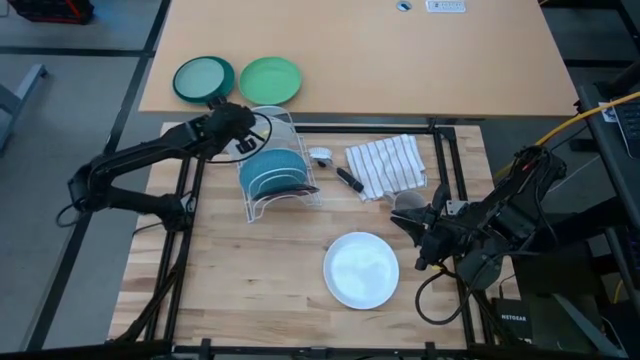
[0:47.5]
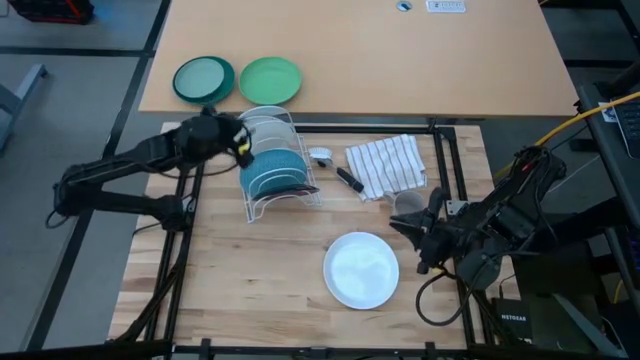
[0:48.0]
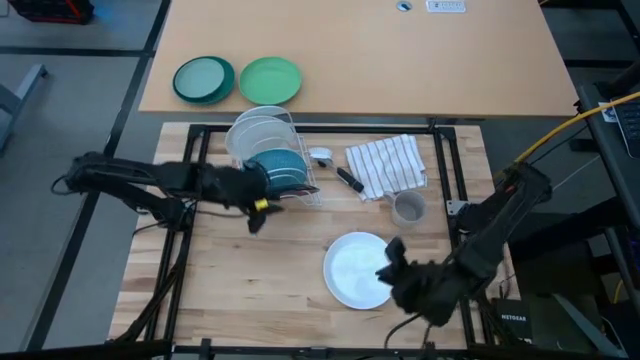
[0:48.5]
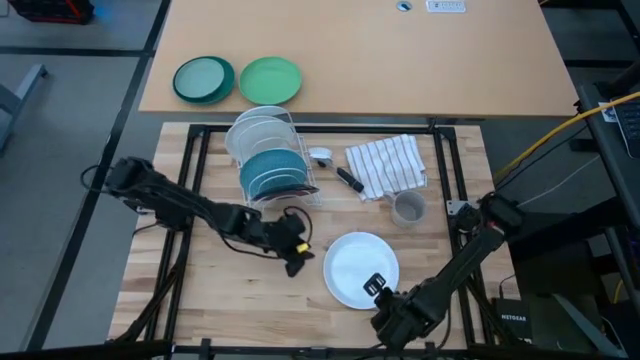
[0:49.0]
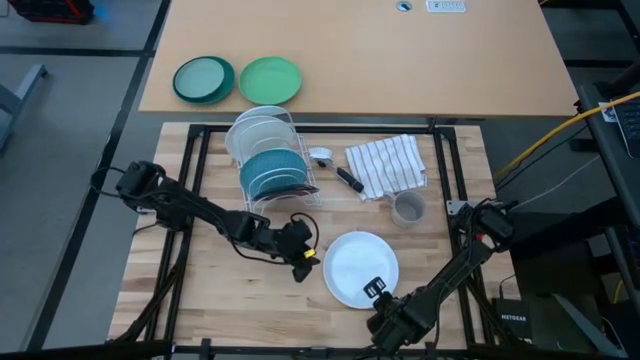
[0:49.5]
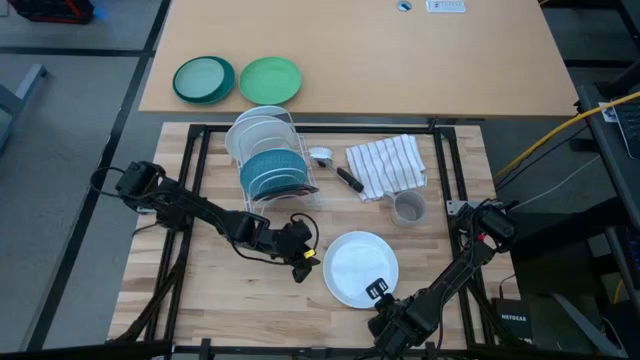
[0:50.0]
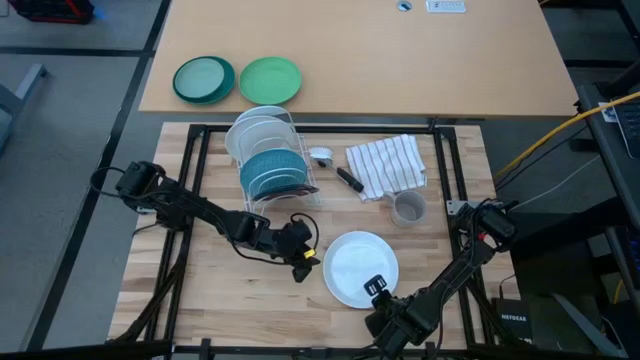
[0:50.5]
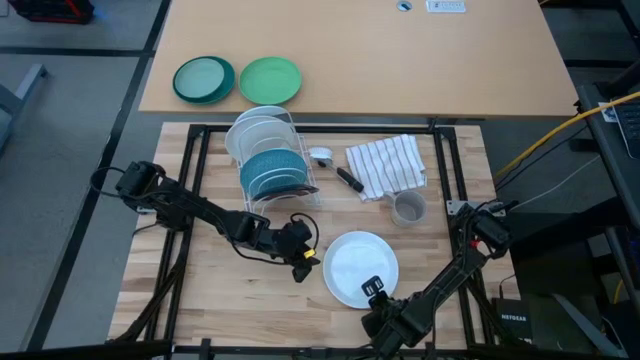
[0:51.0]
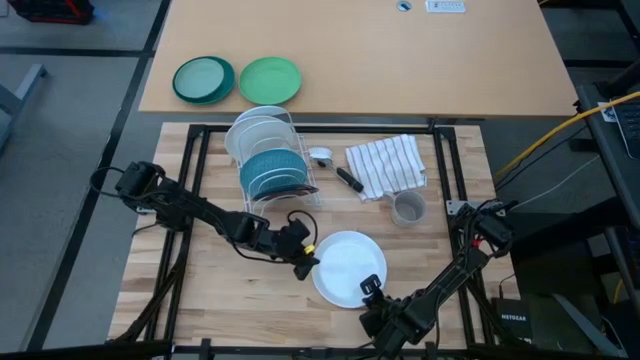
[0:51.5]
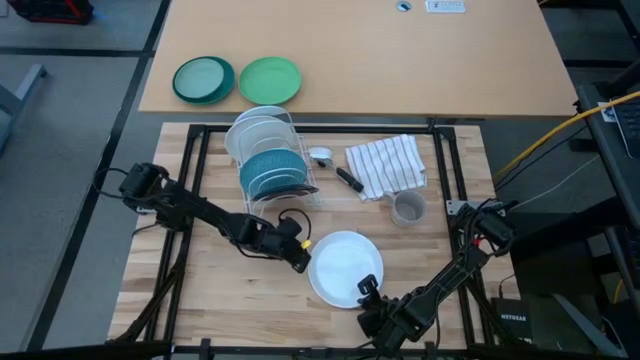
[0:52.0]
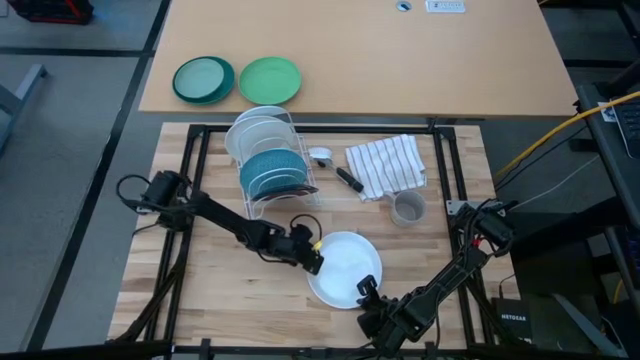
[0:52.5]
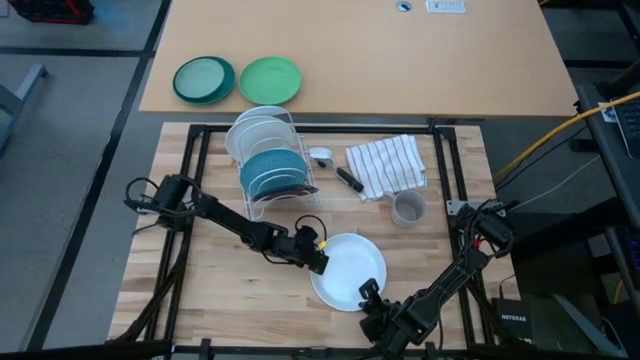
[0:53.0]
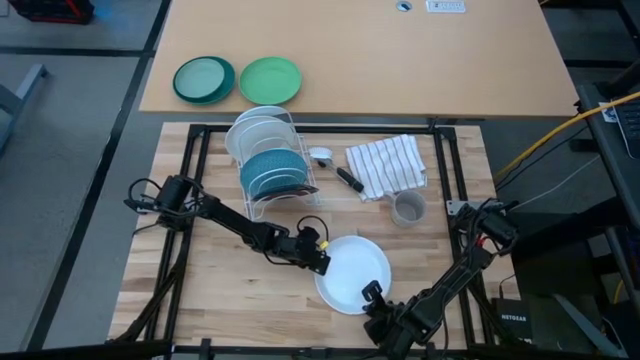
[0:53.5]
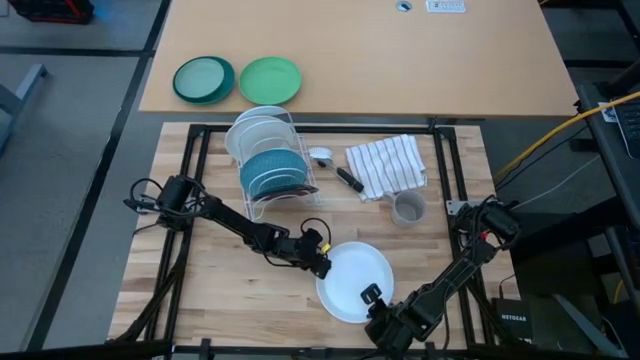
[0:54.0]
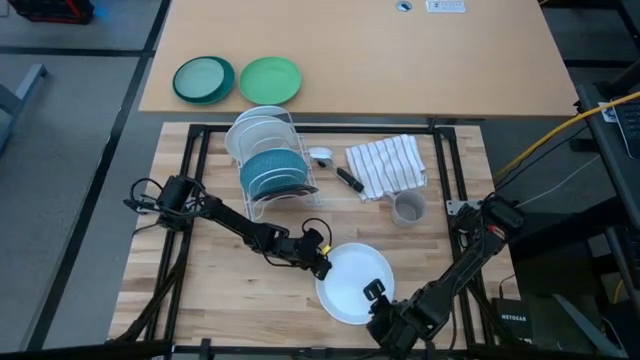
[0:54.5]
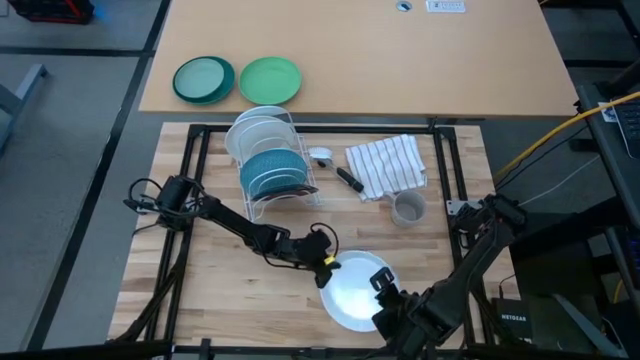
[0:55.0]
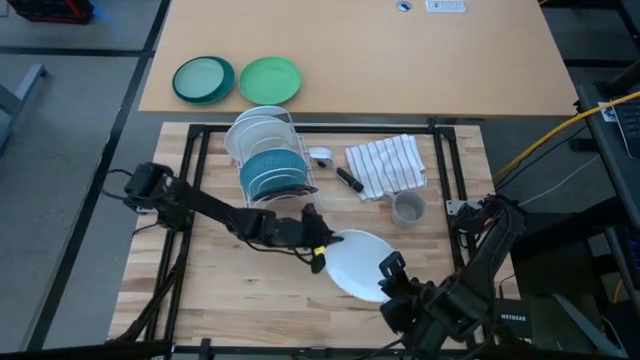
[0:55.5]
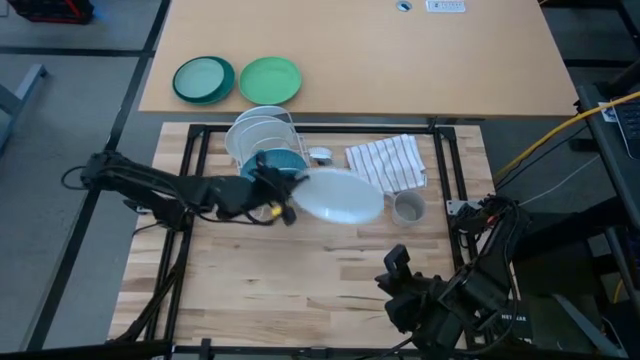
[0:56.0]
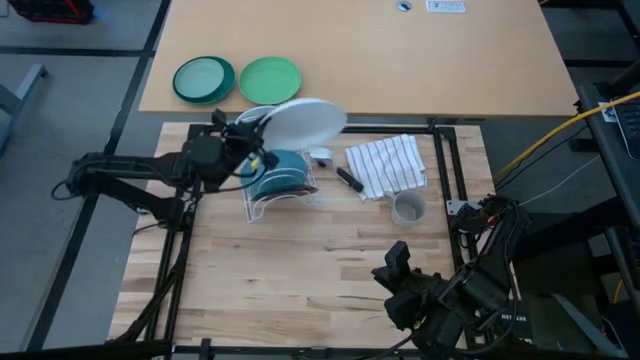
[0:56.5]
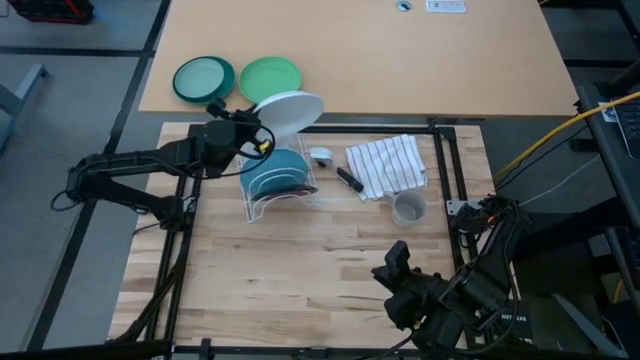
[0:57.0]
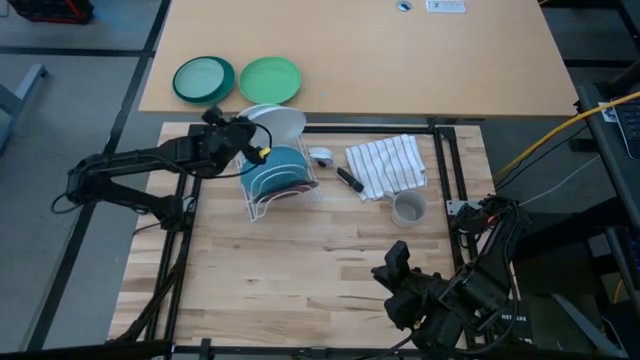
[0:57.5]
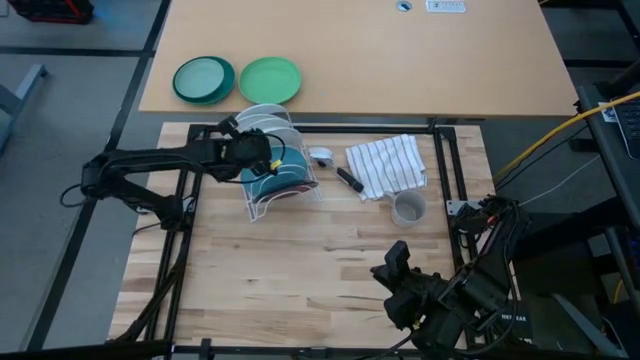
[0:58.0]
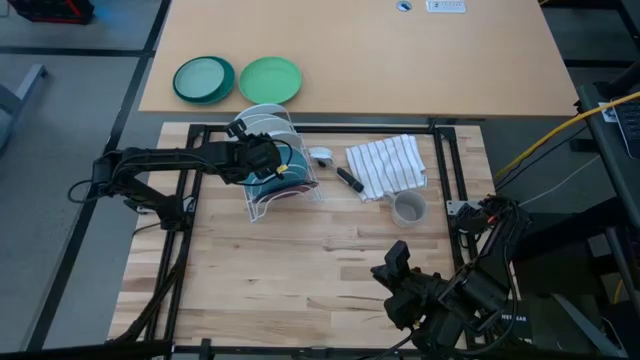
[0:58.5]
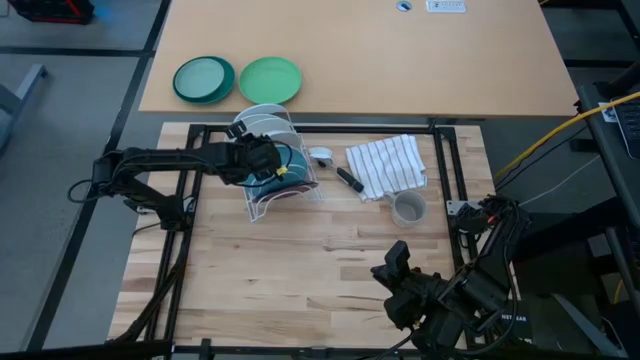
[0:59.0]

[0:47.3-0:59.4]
Task: Sort dishes
Put the white plate in the dish rack

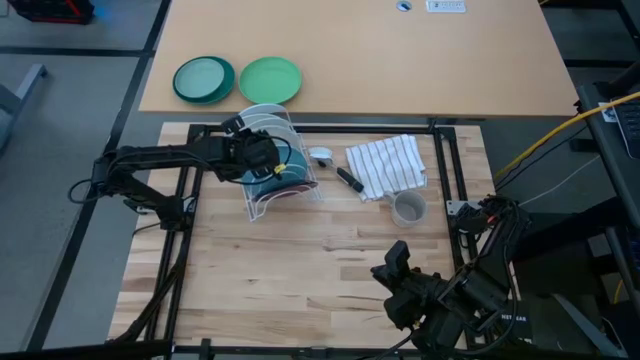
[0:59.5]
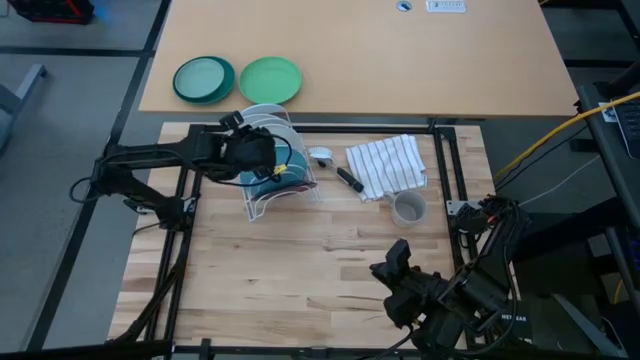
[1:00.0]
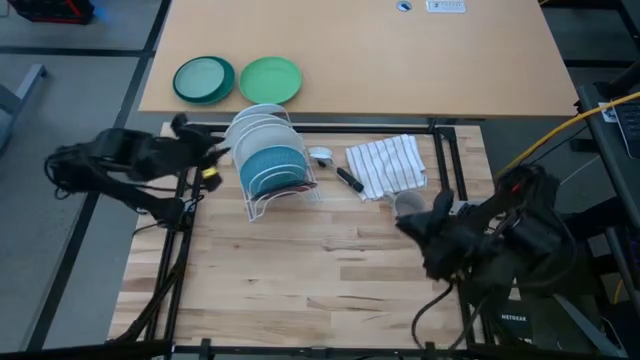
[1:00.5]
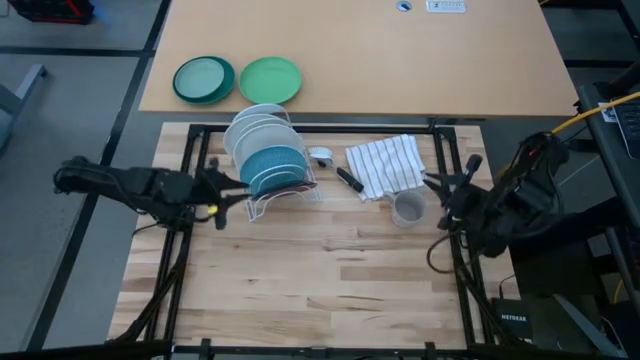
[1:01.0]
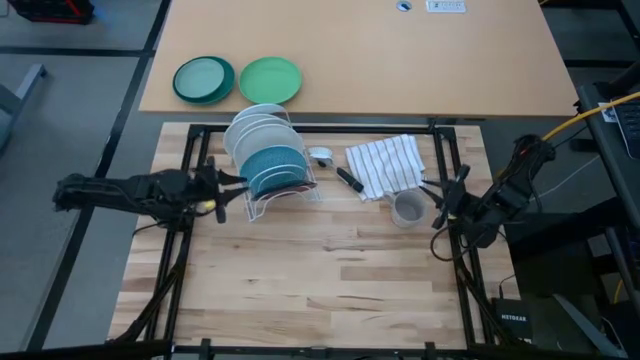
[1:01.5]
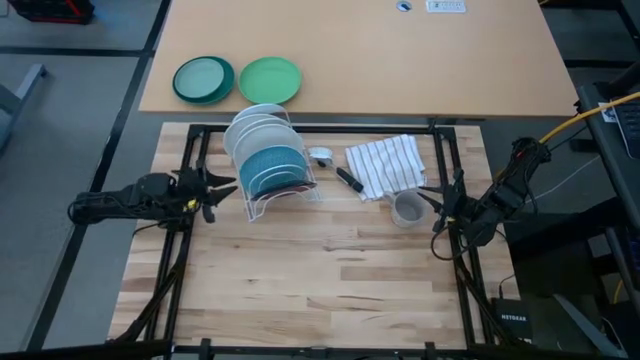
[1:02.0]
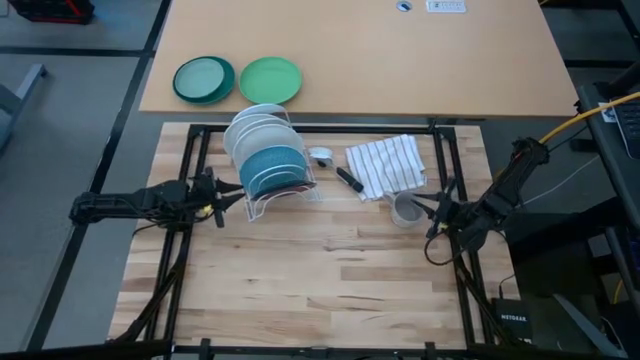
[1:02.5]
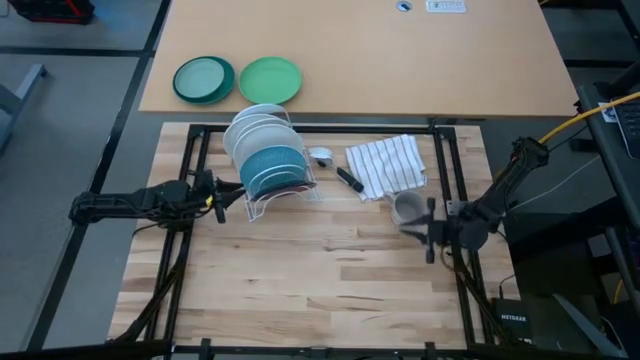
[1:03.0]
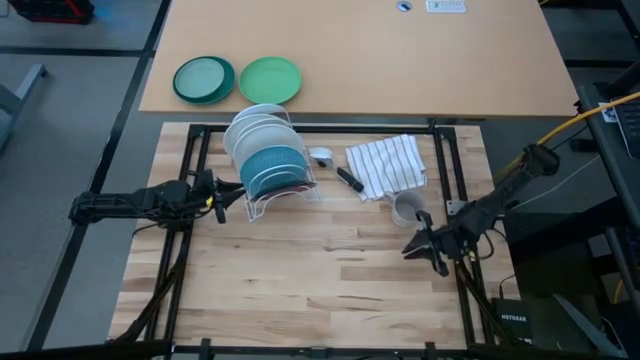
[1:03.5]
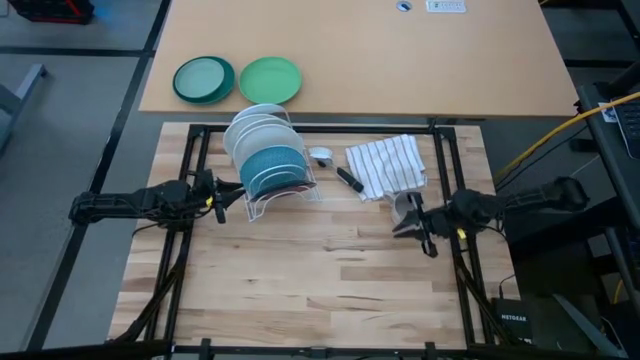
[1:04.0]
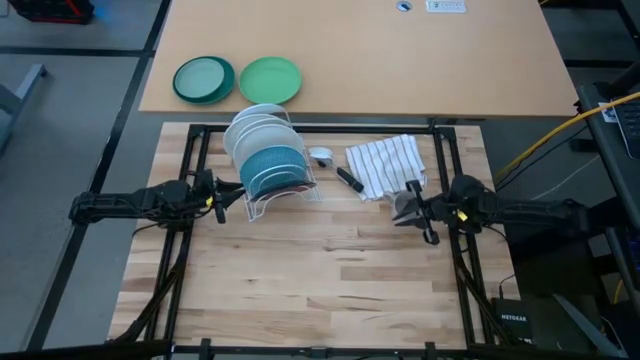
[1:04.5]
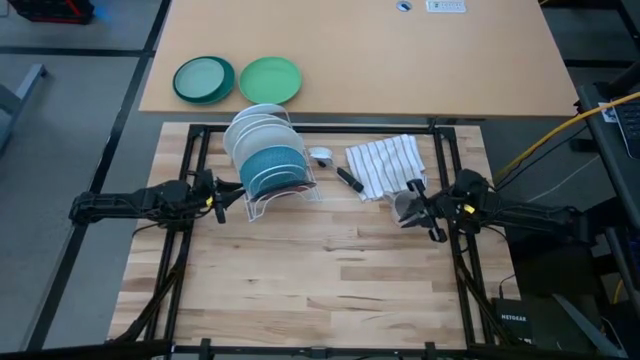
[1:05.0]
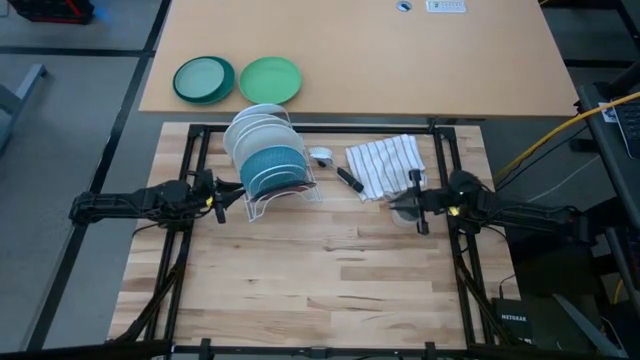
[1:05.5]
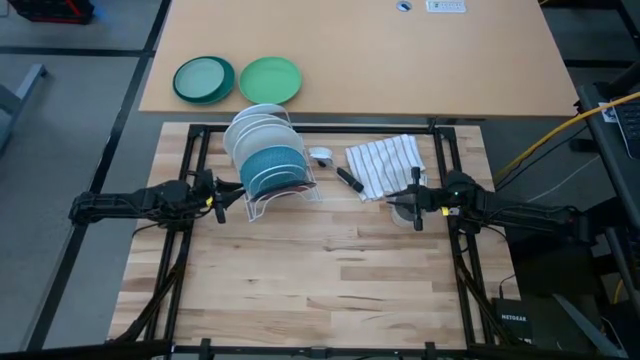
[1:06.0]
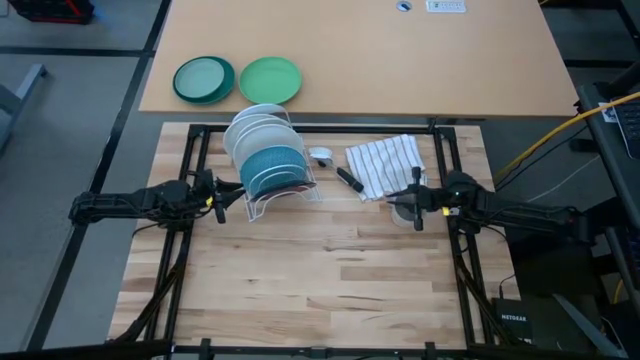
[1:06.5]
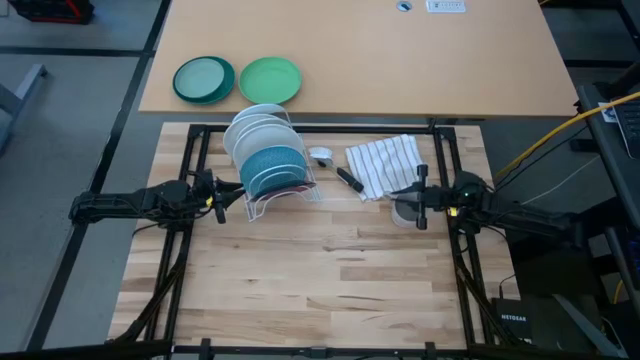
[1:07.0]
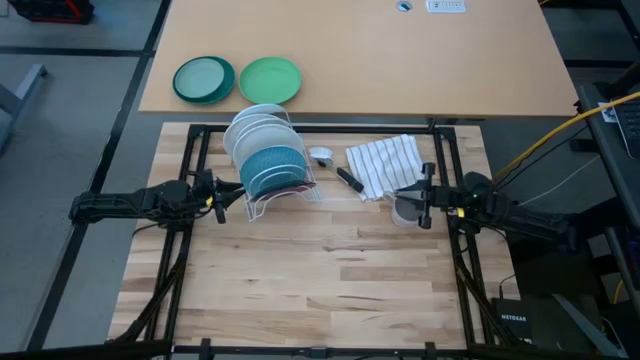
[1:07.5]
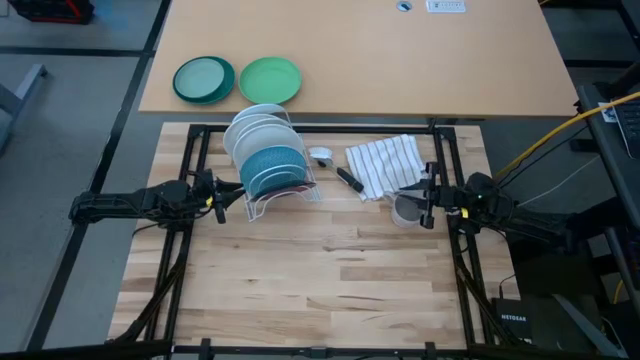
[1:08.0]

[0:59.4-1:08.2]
Return to Home Position

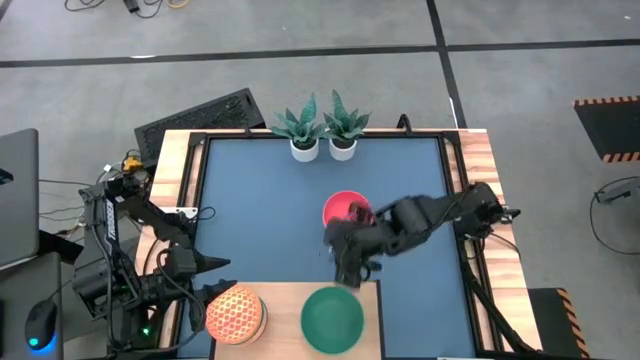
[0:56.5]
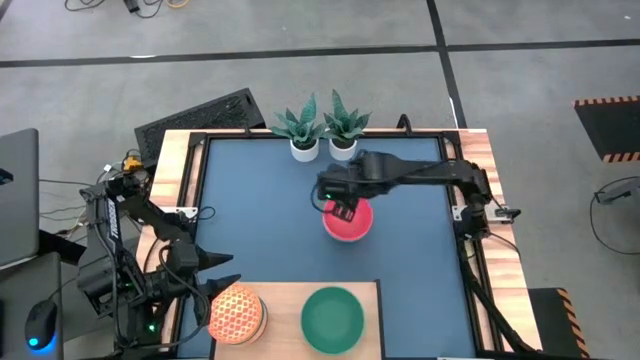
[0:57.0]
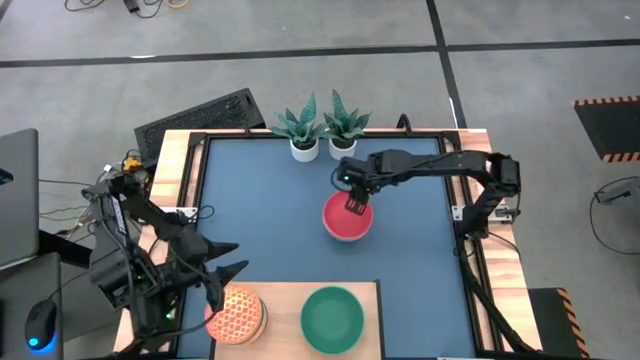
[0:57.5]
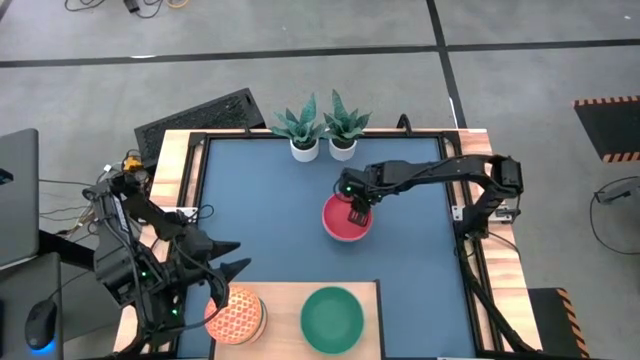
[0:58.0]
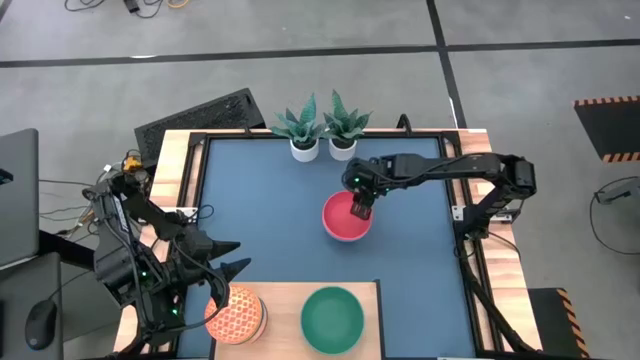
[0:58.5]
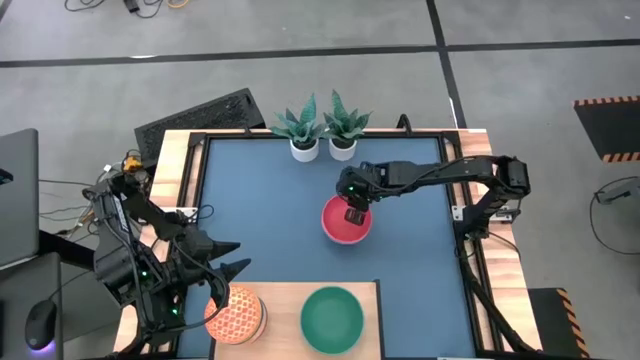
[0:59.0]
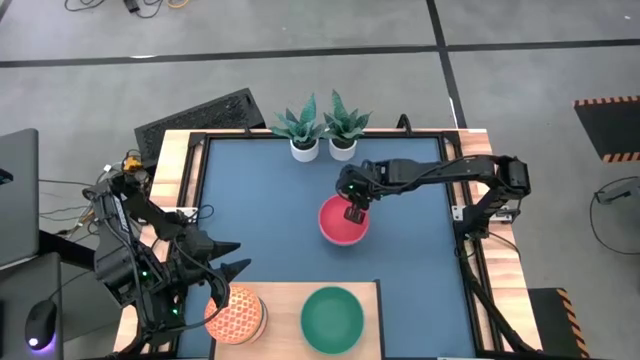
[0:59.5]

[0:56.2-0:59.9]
Task: Place and stack bowls onto a shelf
Stack the red bowl on top of the green bowl on the shelf
